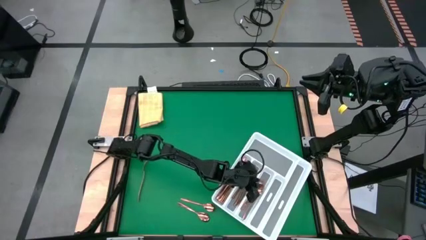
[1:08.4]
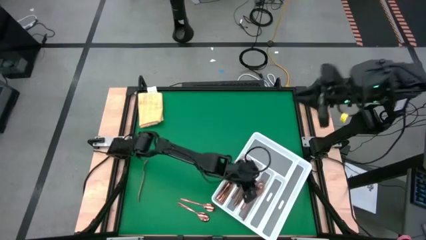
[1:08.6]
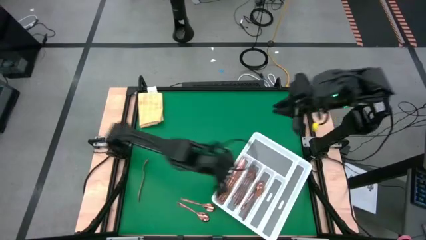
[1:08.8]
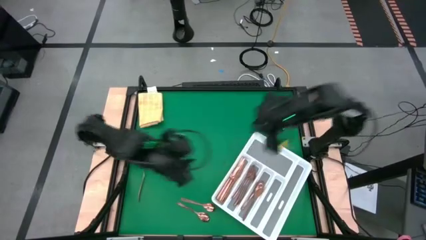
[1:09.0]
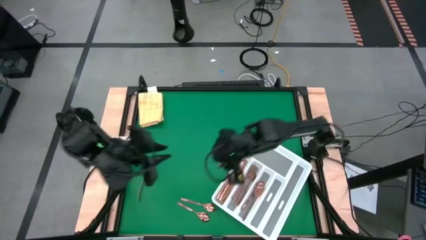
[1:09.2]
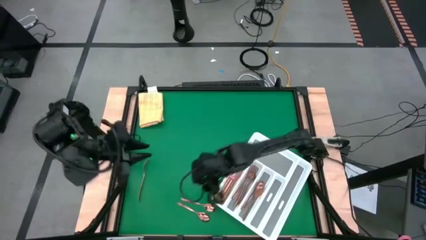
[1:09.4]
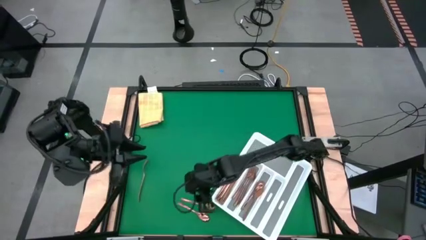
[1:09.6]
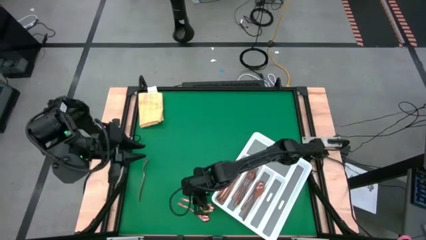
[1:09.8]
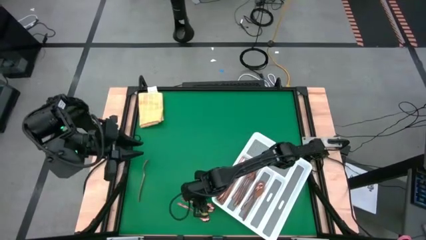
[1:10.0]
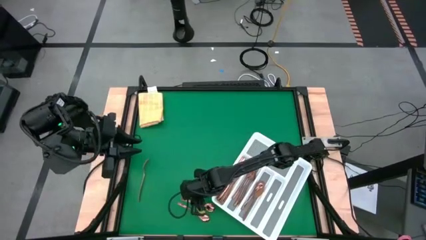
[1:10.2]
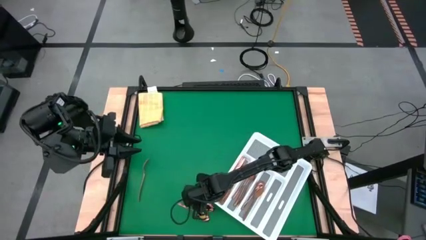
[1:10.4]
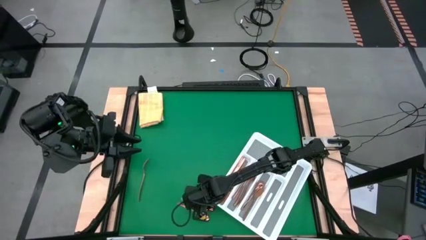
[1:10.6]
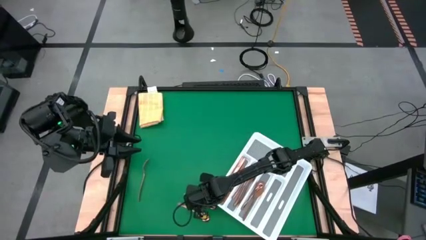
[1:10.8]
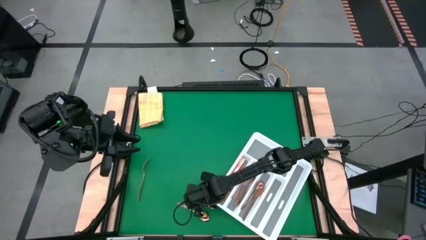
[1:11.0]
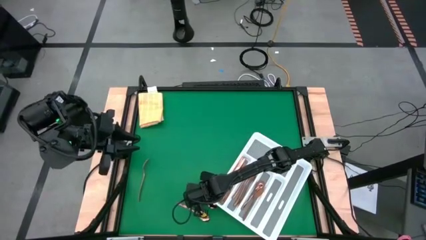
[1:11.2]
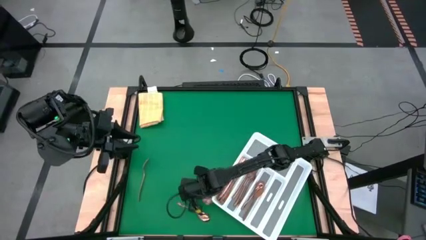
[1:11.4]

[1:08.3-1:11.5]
Task: Sort silverware
Put the gold spoon into the white cutlery tray

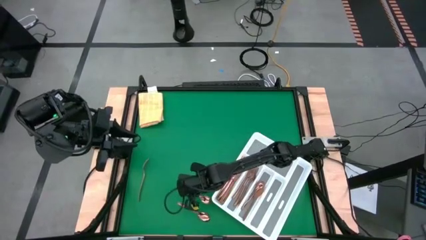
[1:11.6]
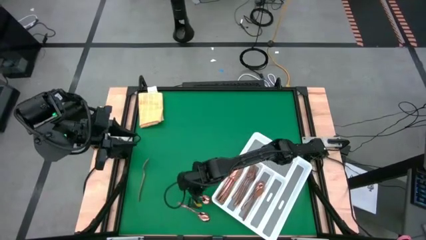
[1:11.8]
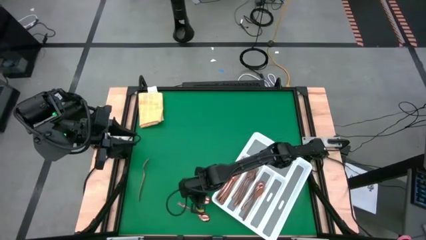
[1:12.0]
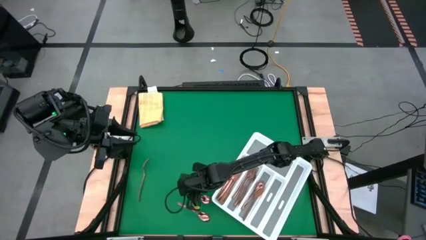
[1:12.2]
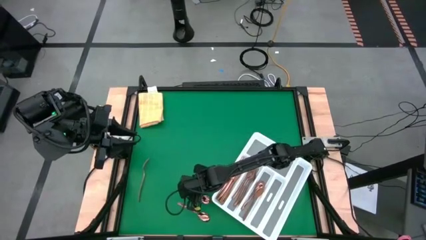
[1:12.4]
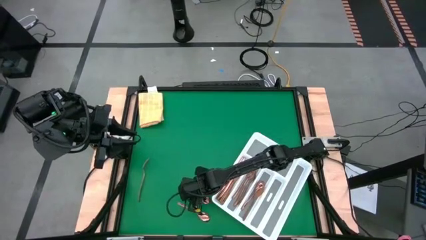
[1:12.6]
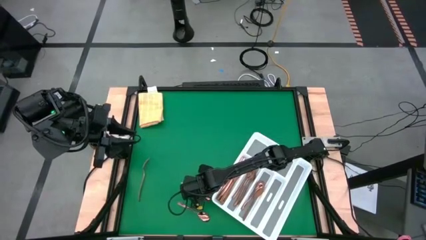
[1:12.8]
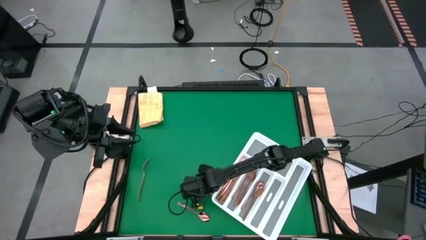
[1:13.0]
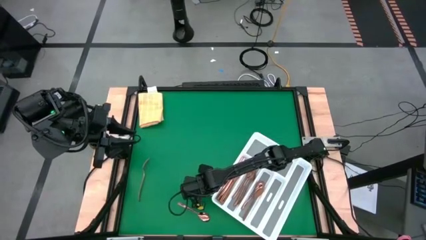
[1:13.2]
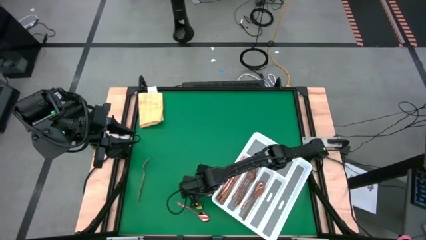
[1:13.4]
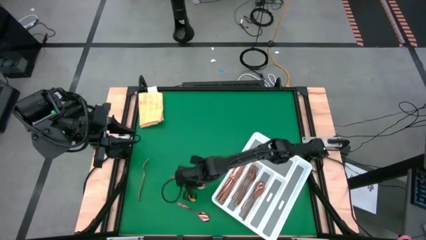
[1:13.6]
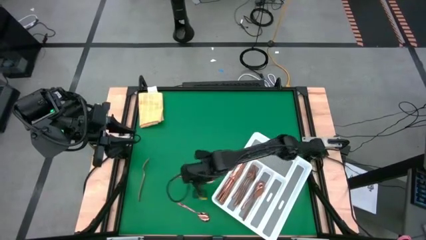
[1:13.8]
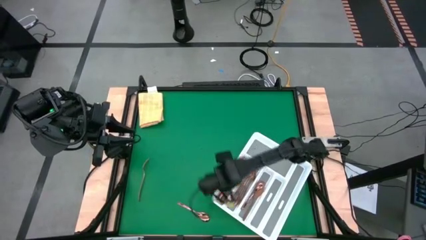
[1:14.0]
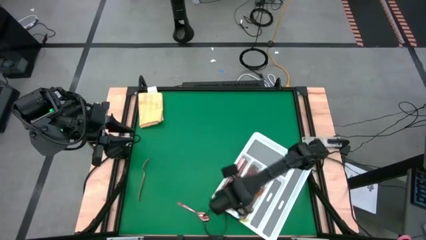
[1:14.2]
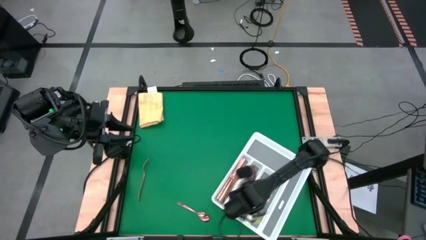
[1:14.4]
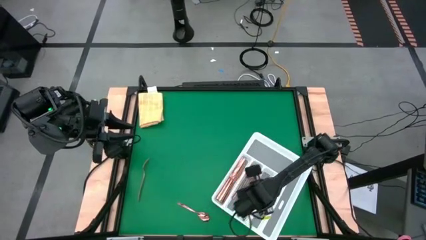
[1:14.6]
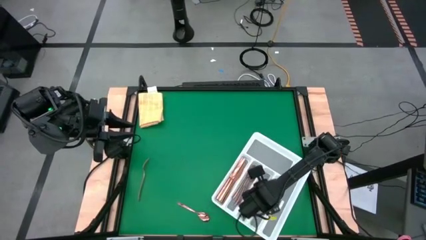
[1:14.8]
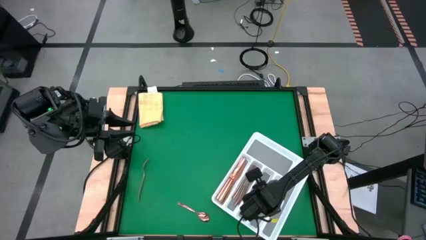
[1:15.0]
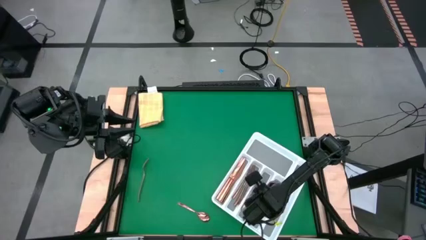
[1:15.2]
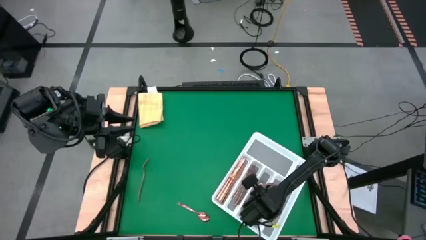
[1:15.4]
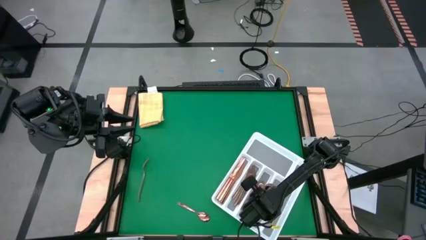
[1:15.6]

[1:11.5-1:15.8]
Put the gold spoon into the white cutlery tray

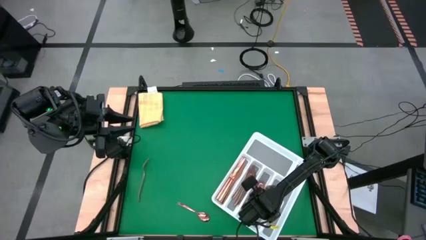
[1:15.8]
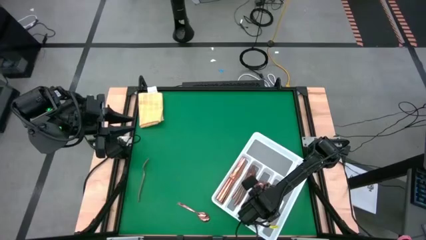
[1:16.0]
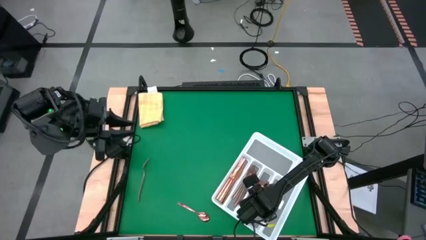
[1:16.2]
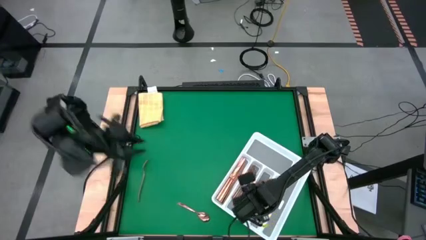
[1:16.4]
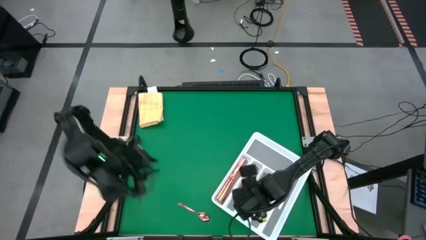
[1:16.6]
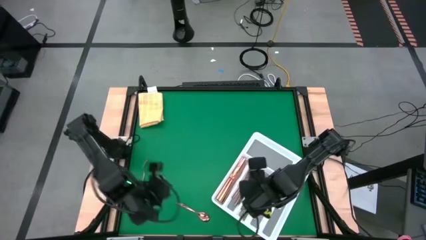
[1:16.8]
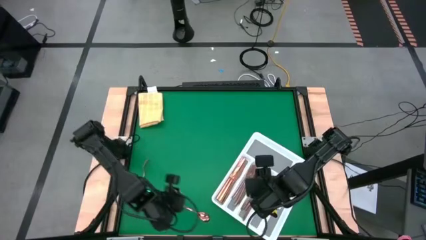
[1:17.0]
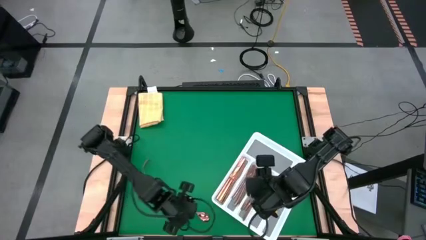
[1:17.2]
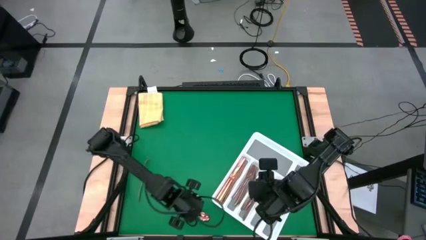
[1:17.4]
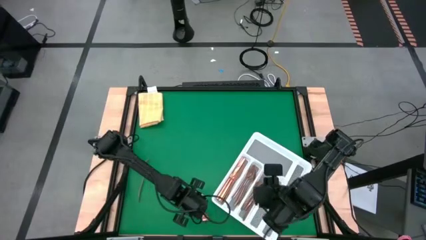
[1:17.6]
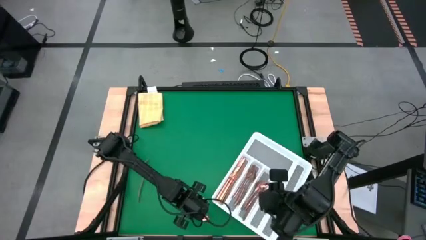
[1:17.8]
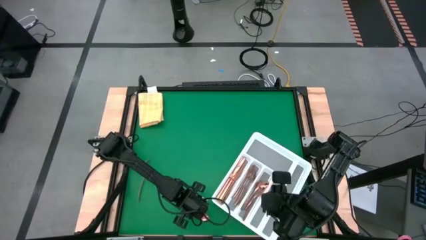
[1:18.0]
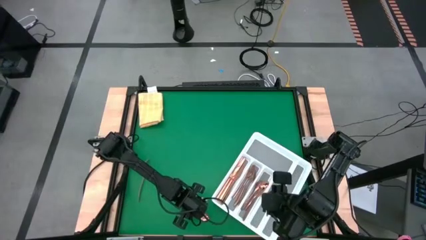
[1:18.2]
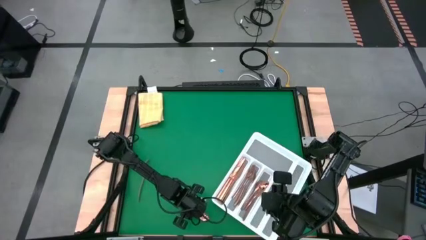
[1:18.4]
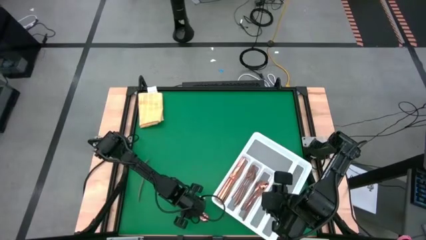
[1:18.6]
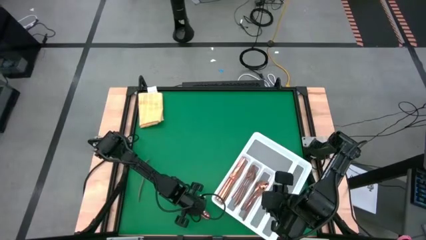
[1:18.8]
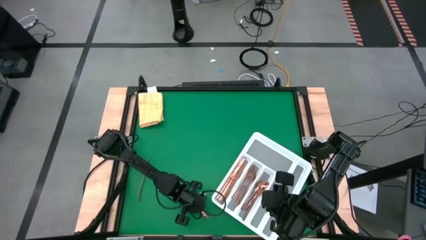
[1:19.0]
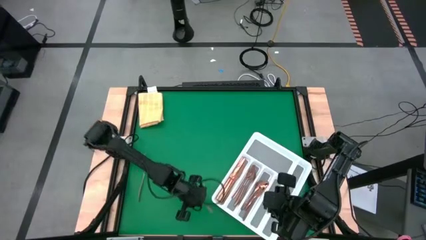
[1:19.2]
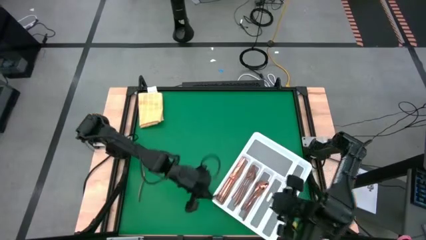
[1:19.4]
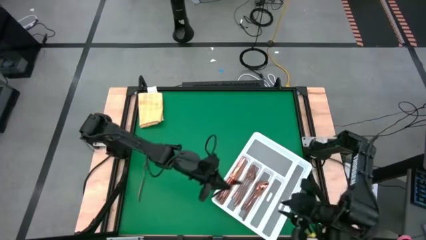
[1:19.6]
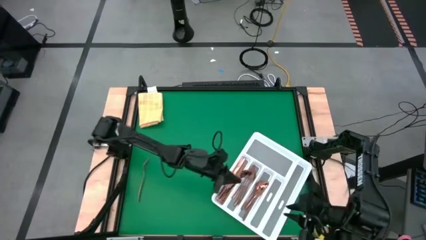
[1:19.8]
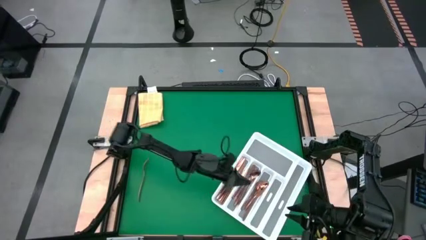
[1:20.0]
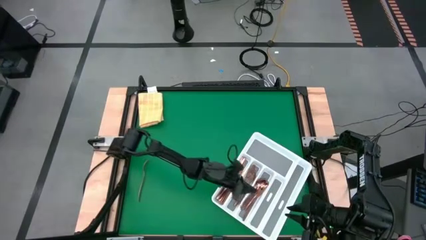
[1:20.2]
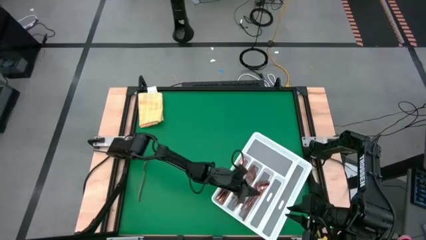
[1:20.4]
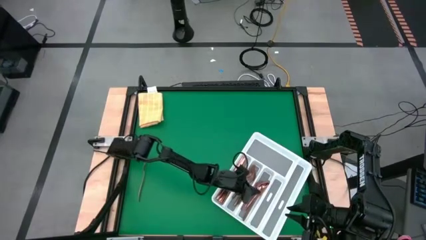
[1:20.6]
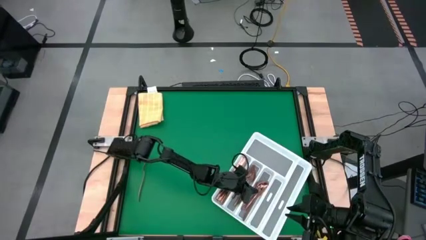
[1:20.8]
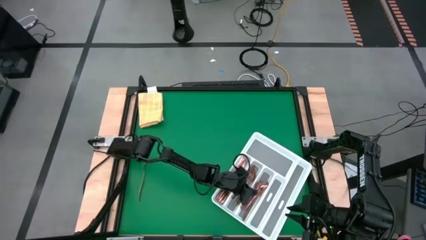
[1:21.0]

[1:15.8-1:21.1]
Put the gold spoon into the white cutlery tray

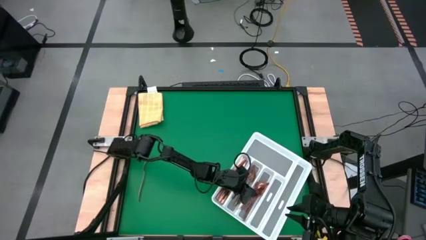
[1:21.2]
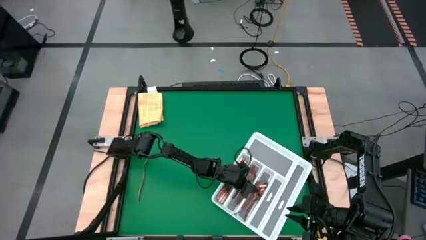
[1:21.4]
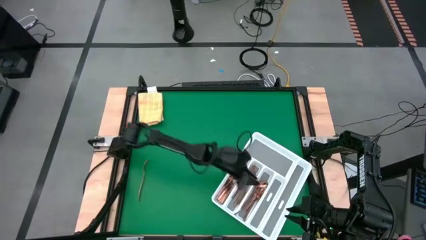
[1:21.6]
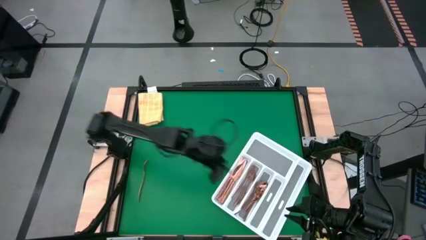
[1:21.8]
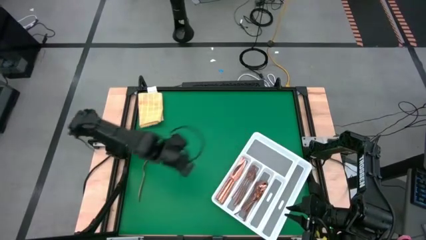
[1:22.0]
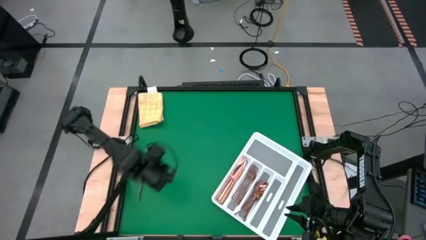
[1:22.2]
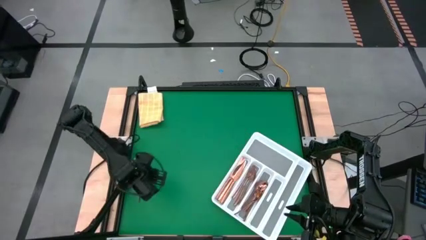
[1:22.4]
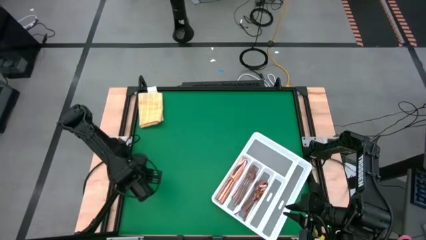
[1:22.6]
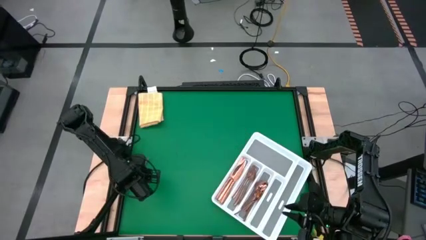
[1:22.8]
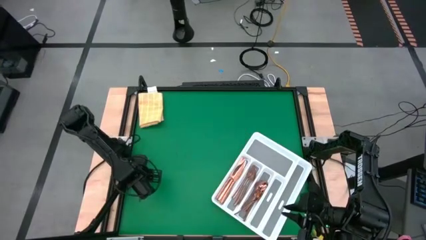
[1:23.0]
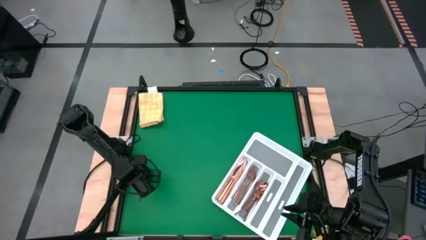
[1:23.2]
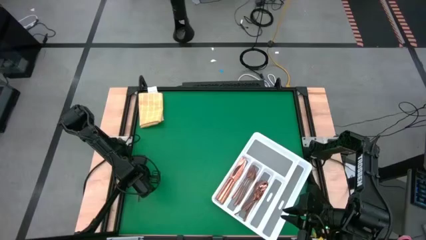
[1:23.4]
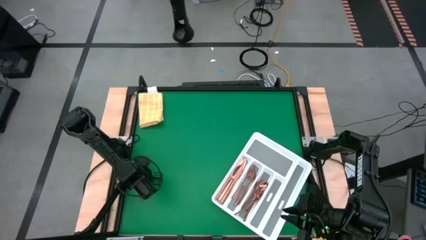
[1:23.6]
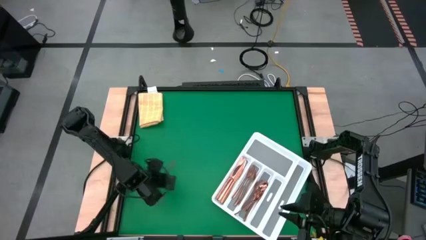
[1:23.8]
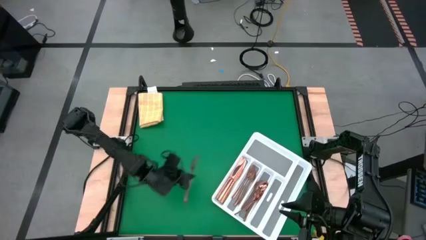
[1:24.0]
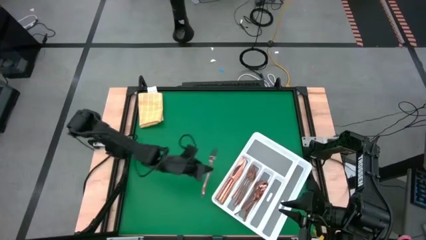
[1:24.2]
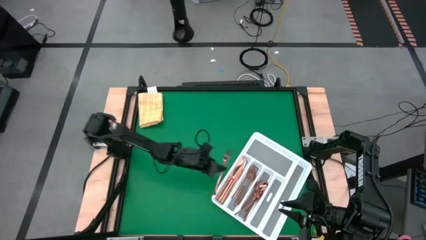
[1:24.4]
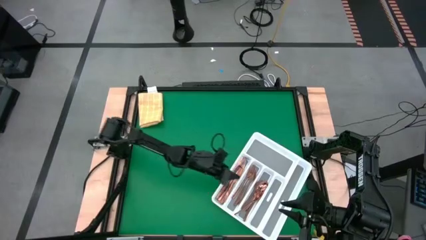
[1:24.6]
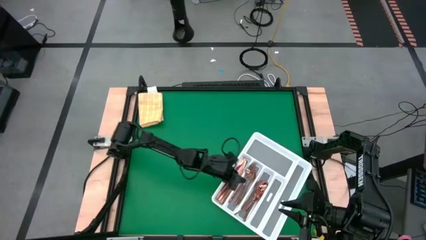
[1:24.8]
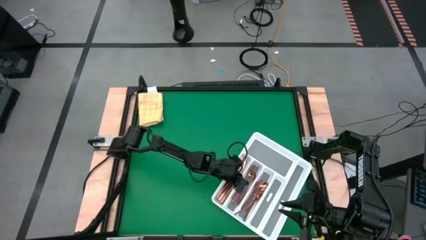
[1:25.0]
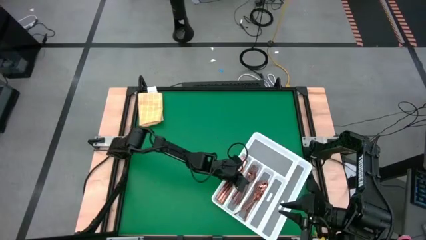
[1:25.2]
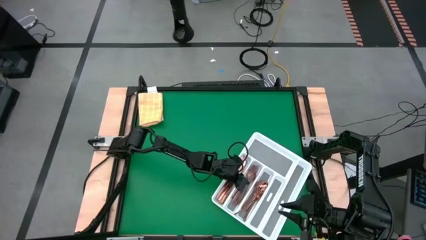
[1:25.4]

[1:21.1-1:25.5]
Put the gold fork into the white cutlery tray
